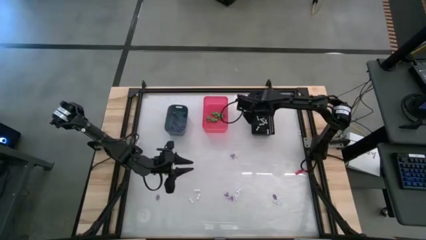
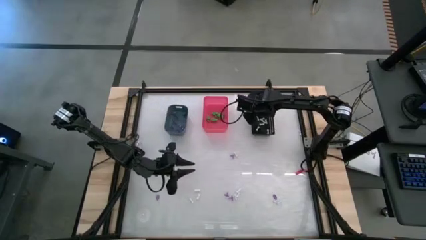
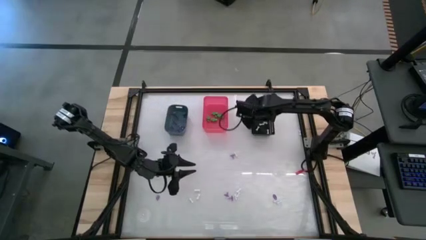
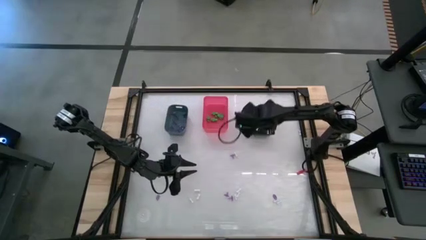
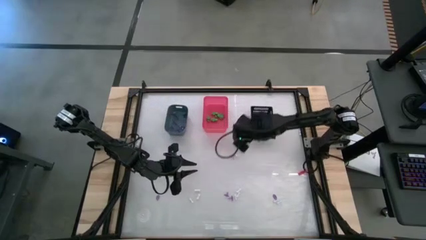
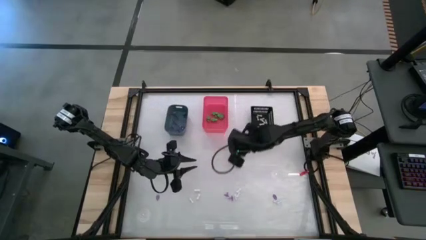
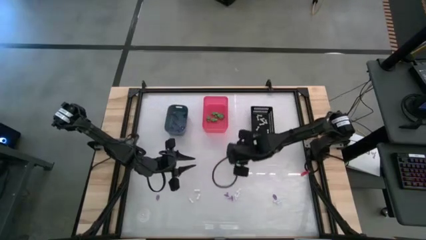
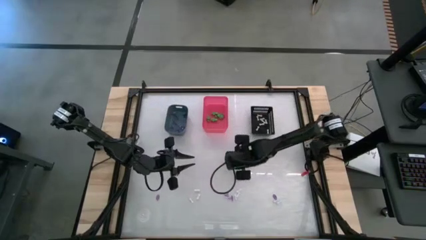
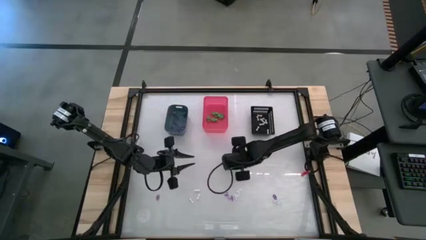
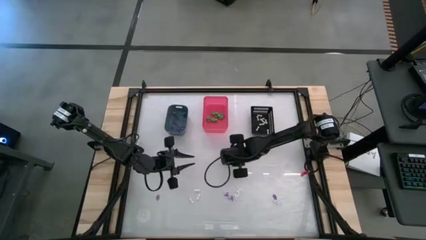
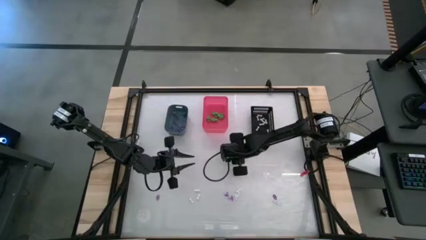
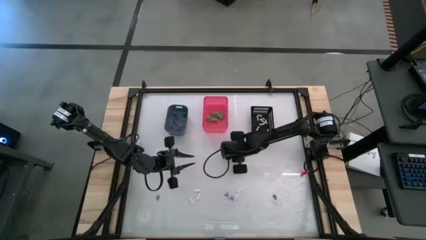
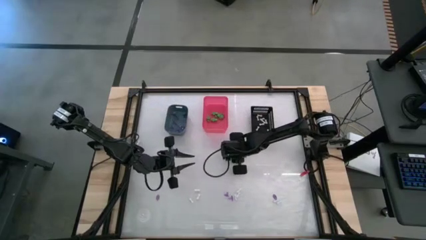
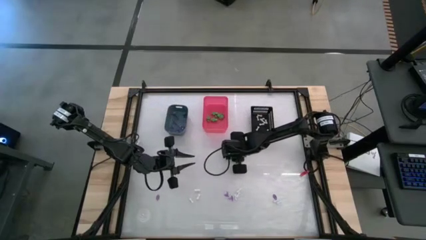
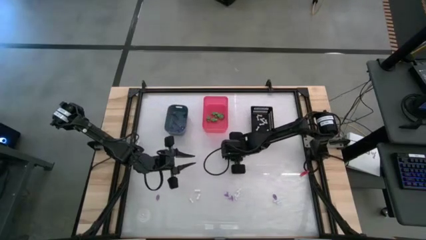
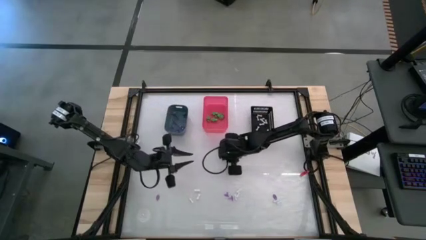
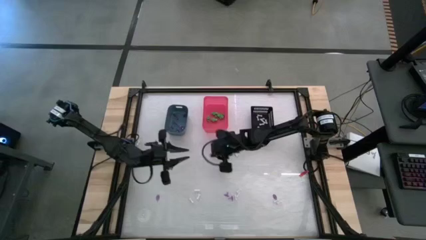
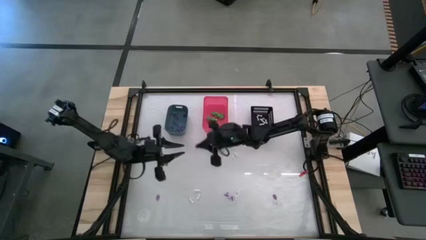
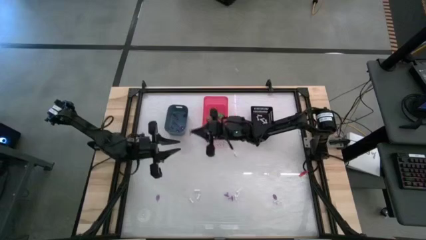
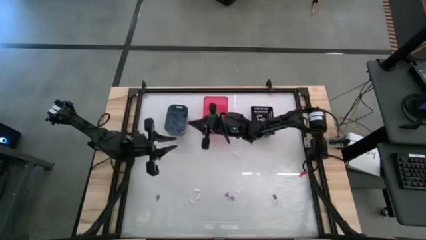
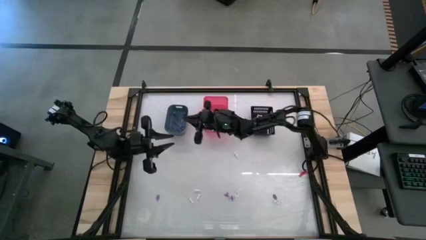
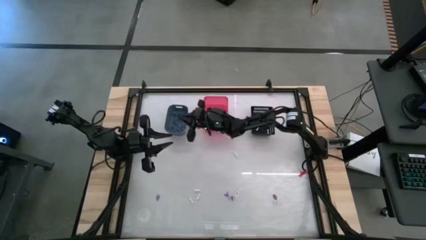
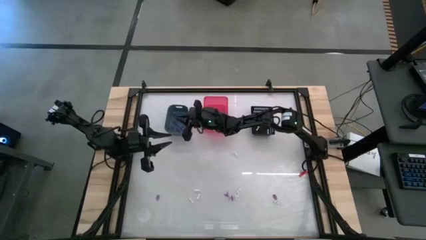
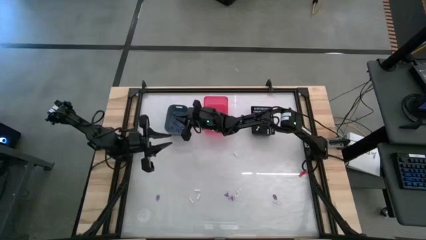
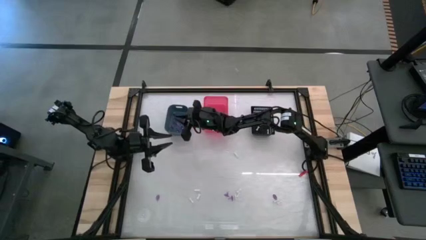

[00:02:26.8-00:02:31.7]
Task: Sort Halloween decoration
Put the purple witch hat toy into the blue bin

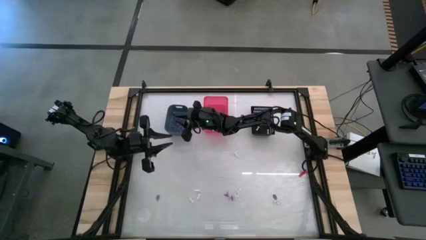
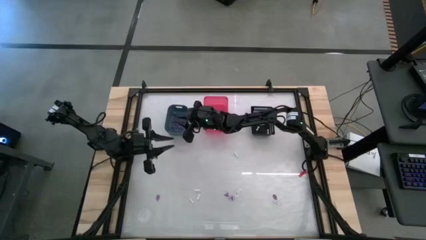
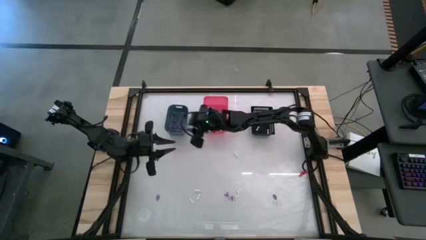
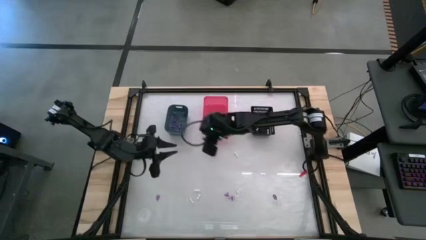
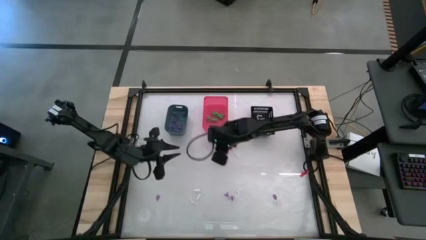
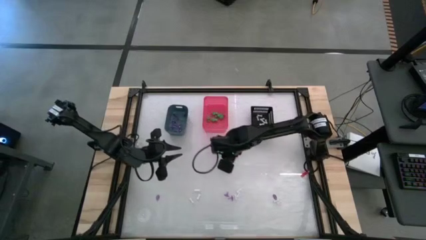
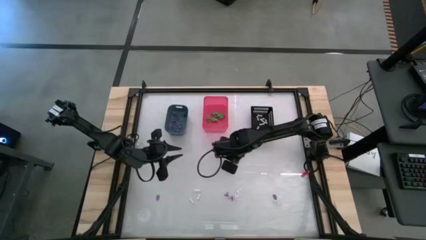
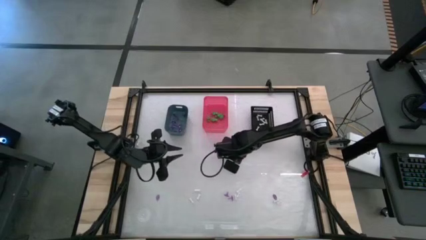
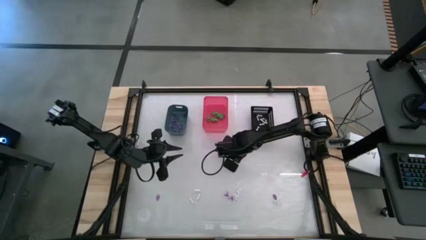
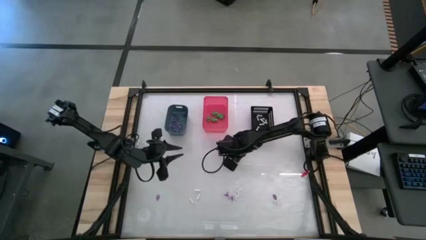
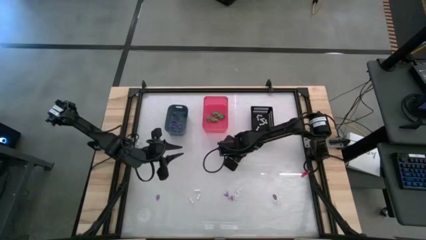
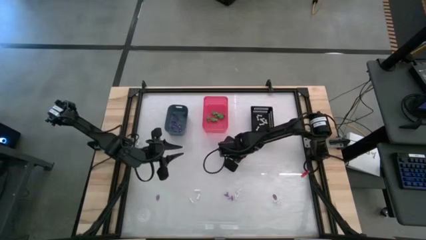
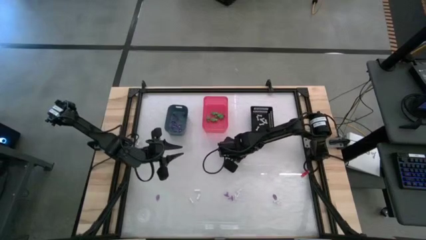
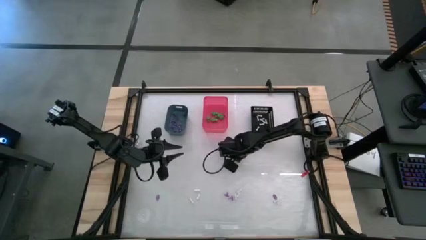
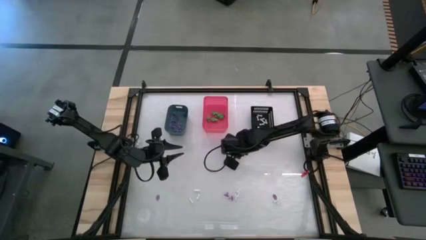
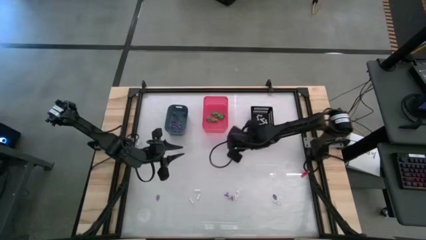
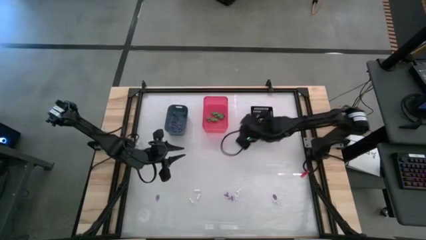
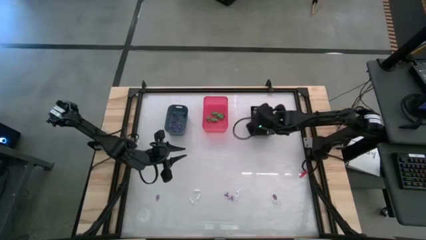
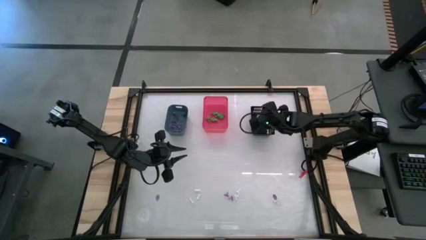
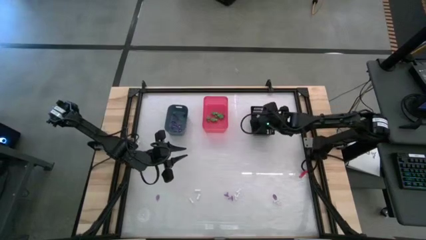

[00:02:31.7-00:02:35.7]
Put the white bone toy into the black bin

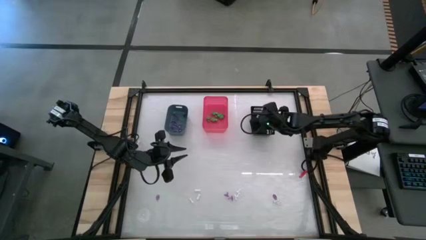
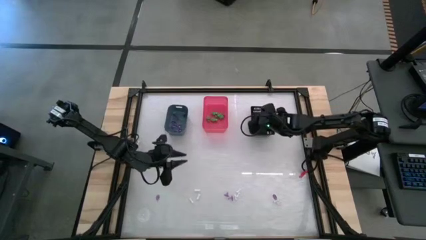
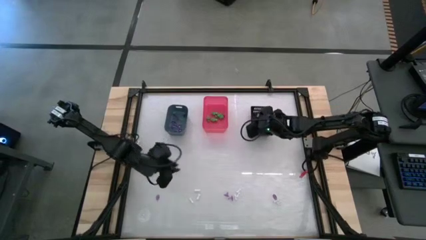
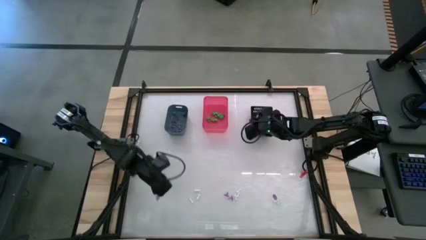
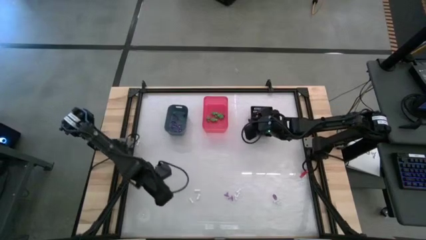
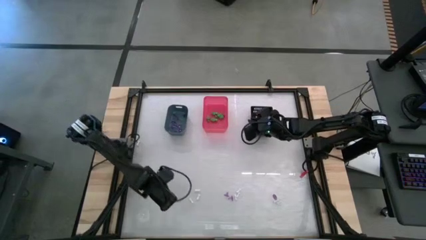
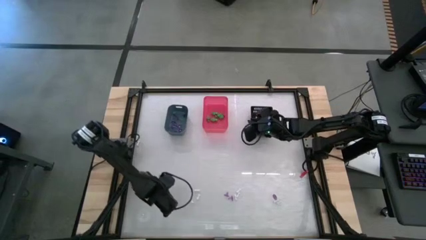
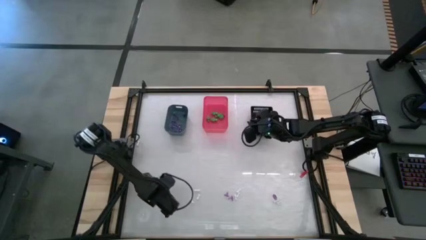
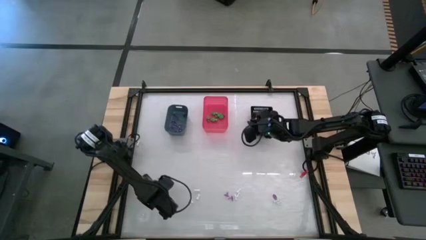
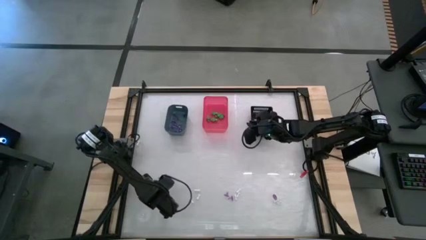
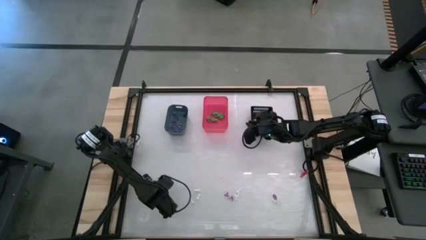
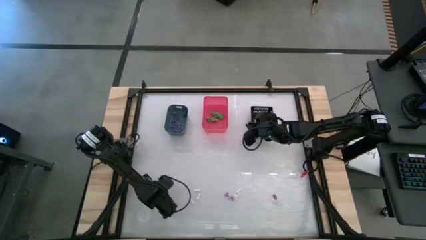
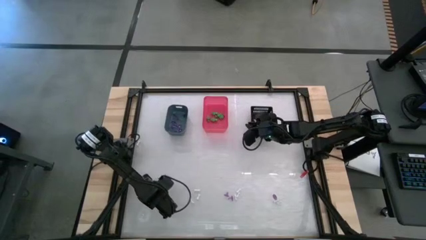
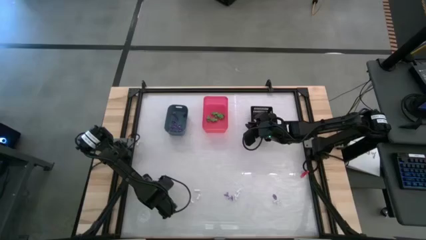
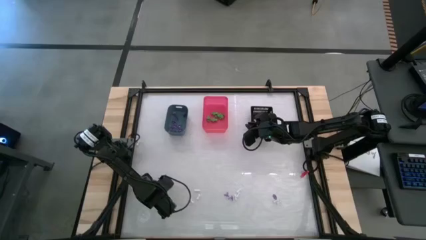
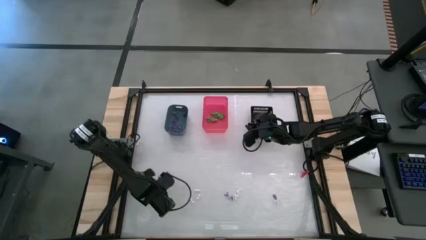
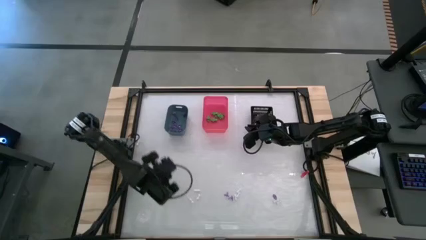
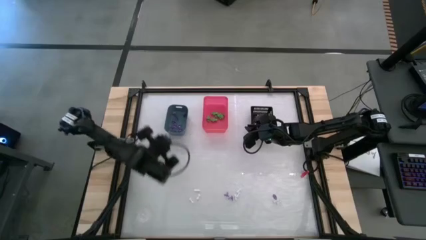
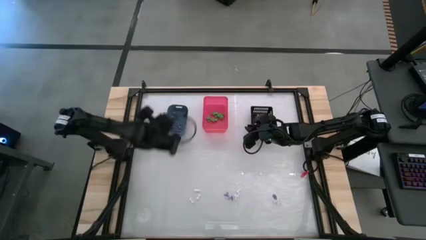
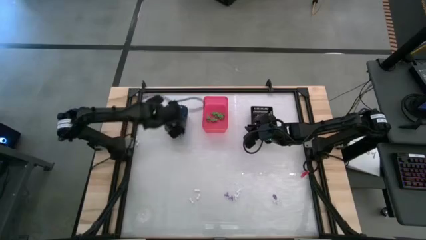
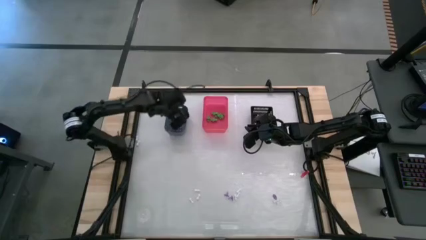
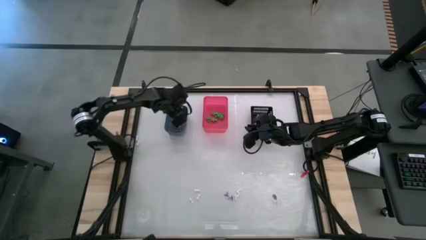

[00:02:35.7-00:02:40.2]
Put the purple witch hat toy into the blue bin

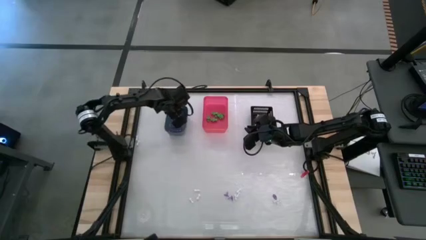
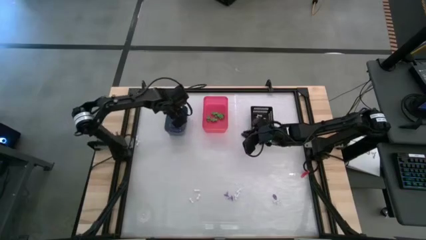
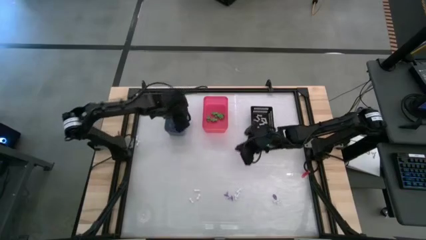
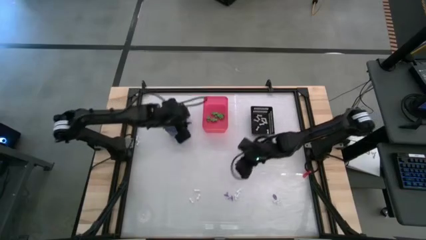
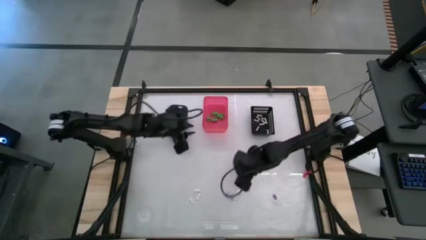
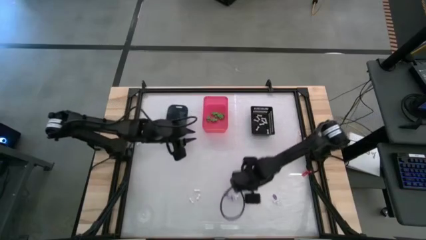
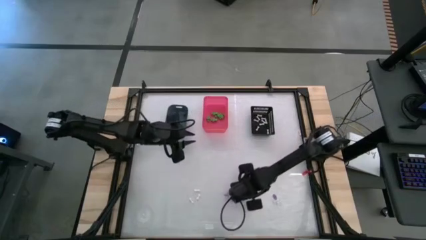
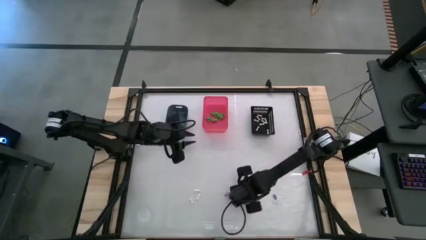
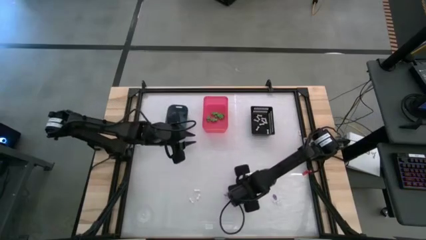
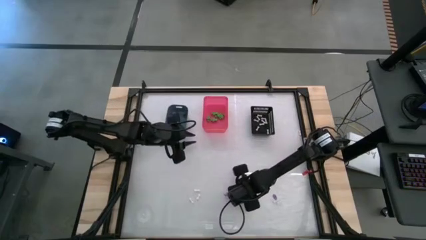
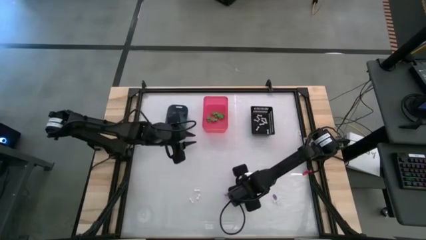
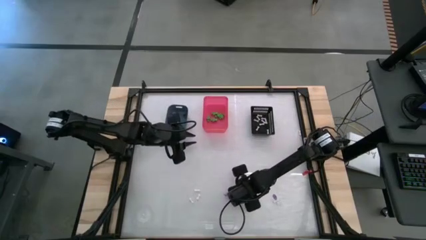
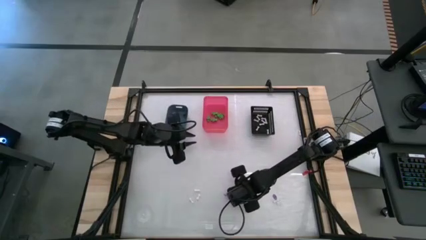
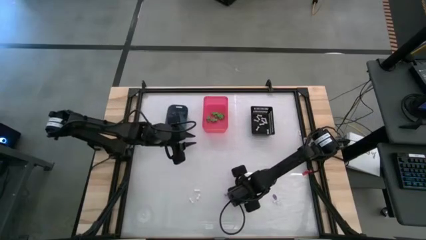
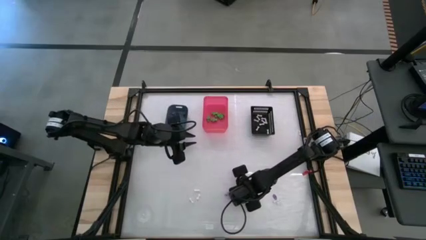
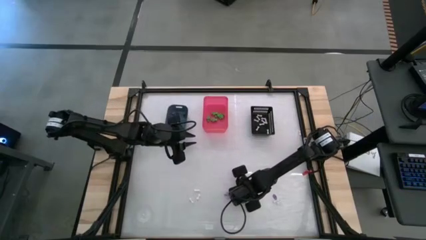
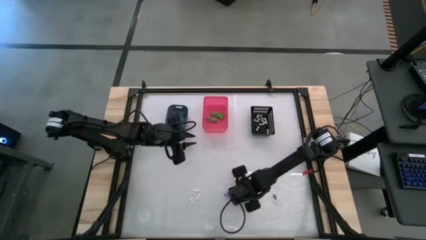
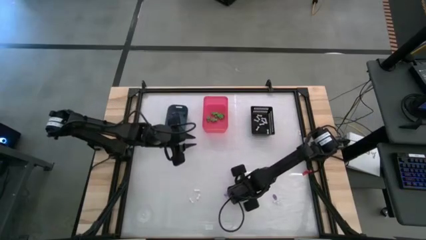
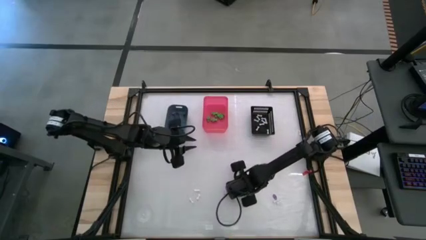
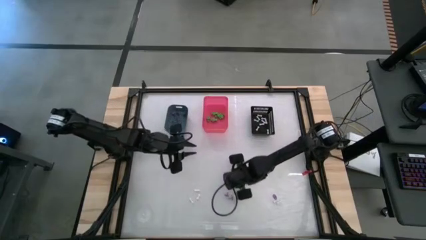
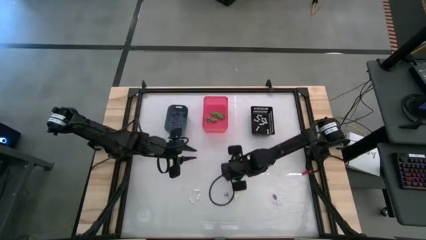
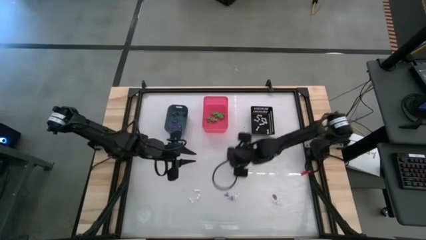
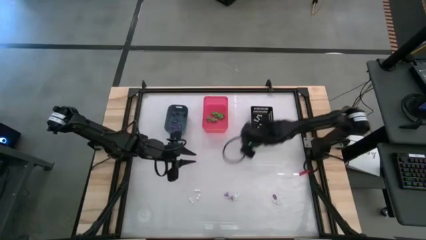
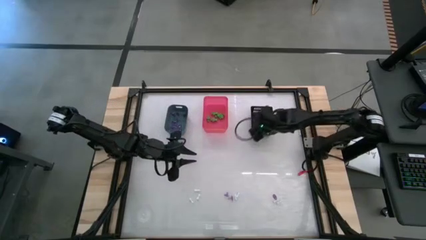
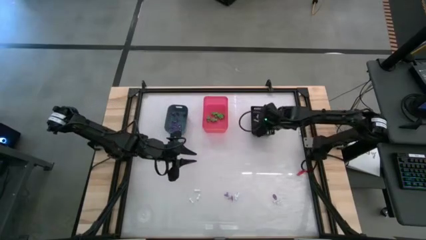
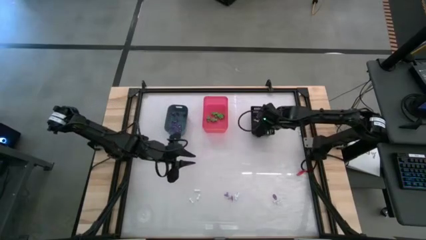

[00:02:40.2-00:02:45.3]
Put the white bone toy into the black bin
